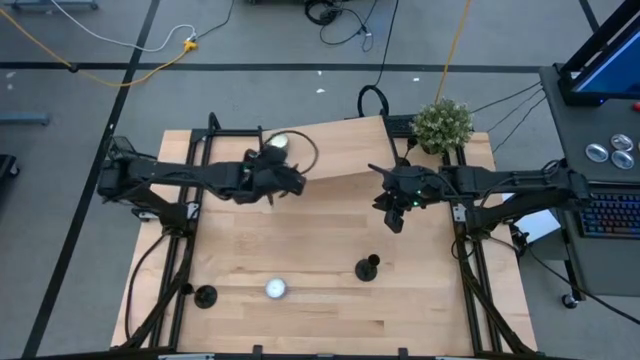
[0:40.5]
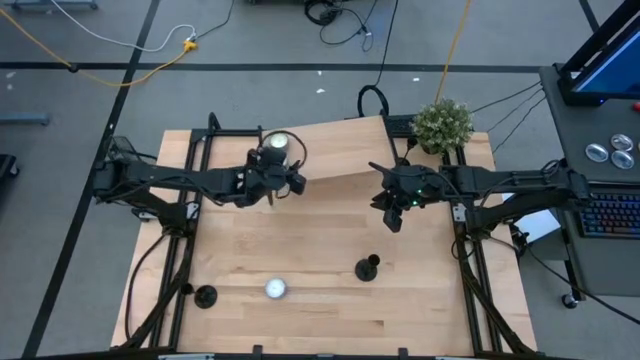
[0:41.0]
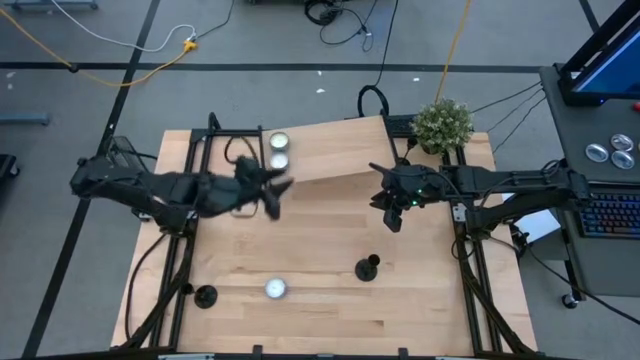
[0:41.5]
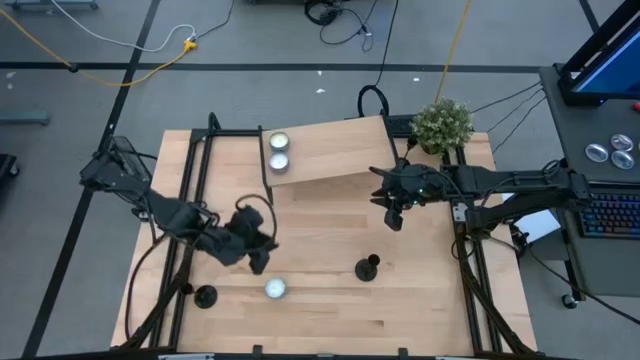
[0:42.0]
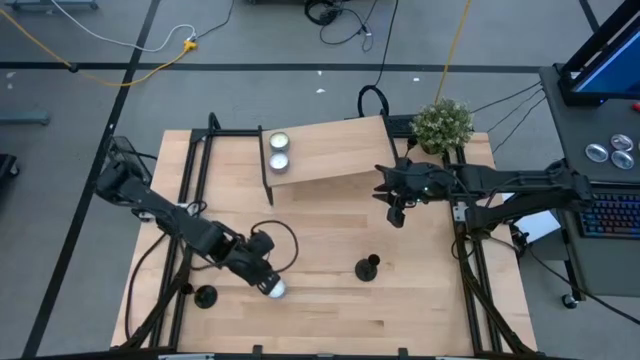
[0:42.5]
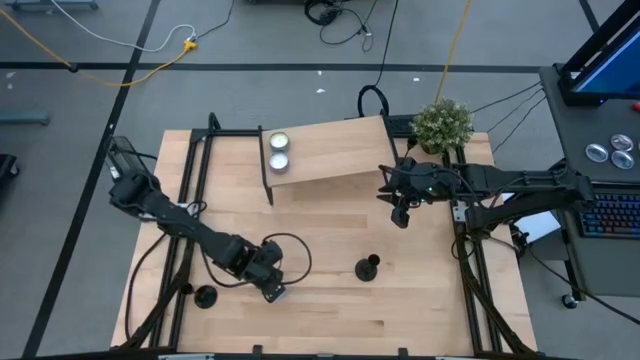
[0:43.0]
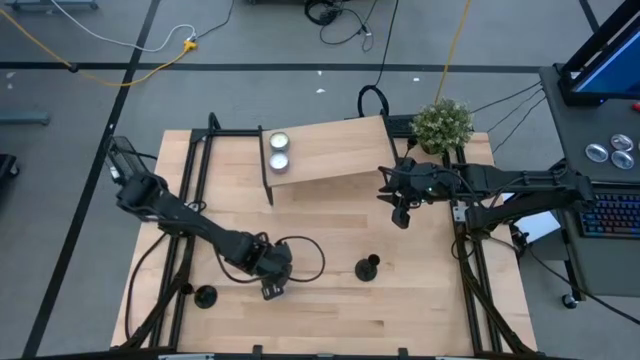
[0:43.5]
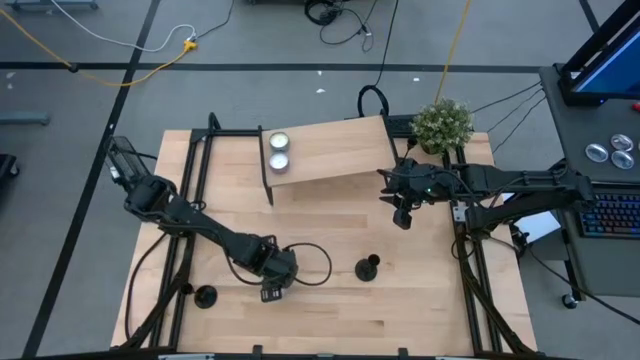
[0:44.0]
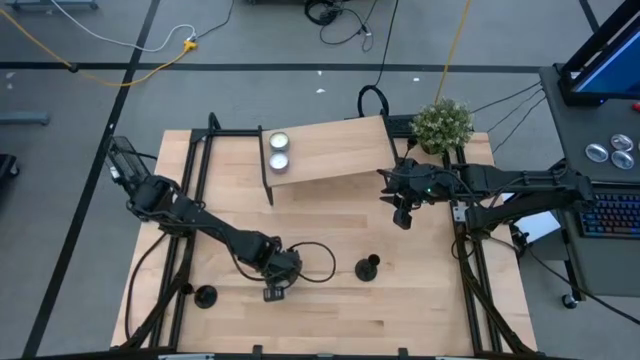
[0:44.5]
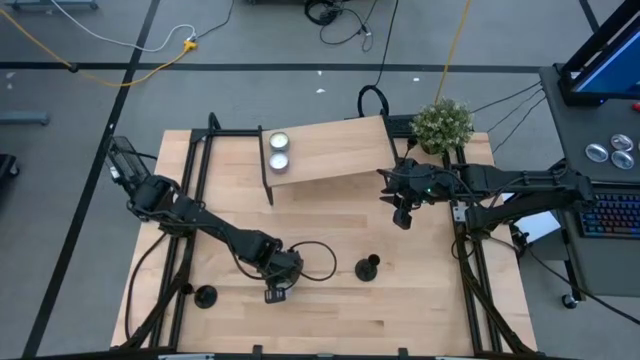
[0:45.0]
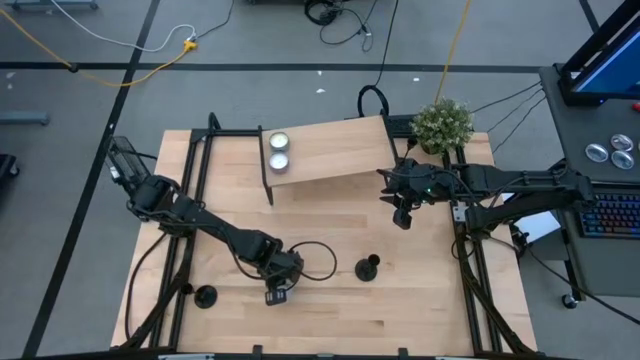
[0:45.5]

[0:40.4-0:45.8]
Task: Pick & Place candle stick holders
Put the red patterned candle on the shelf

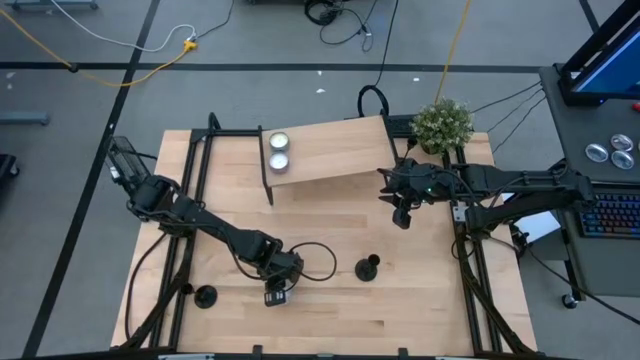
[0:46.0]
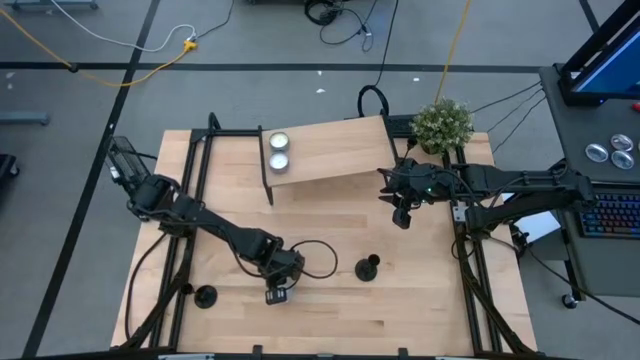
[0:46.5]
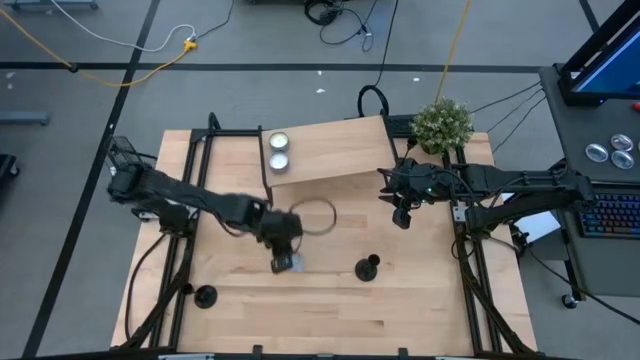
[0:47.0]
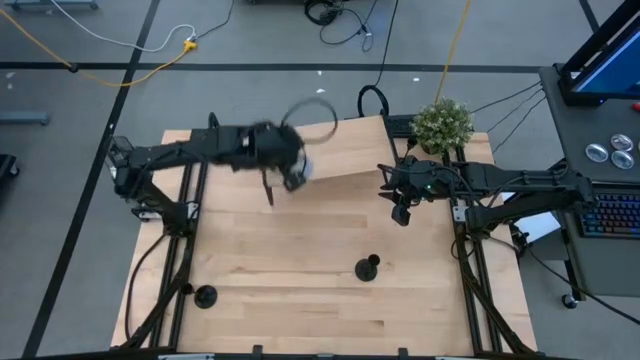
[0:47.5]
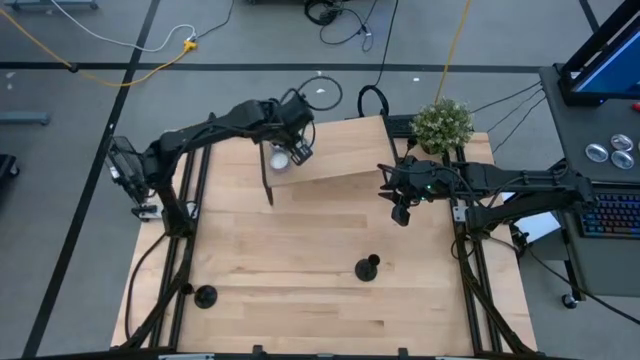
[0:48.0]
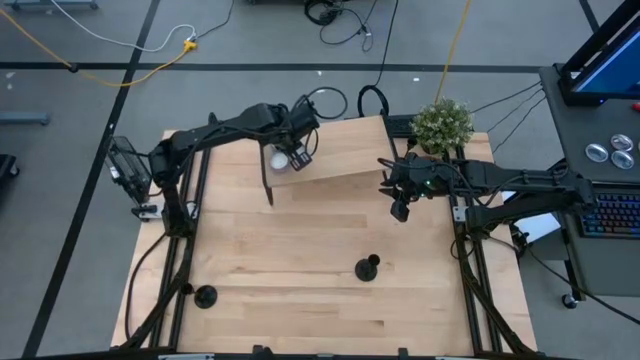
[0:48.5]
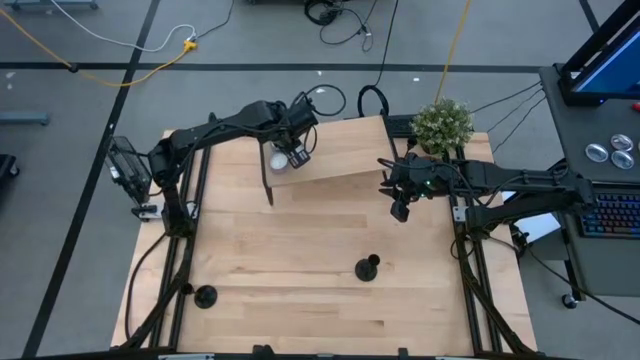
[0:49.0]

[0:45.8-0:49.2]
Put the red patterned candle on the shelf

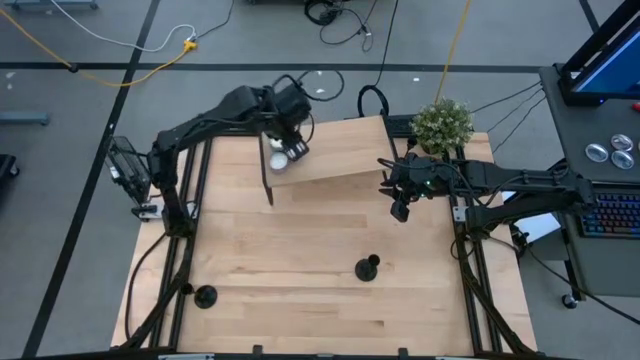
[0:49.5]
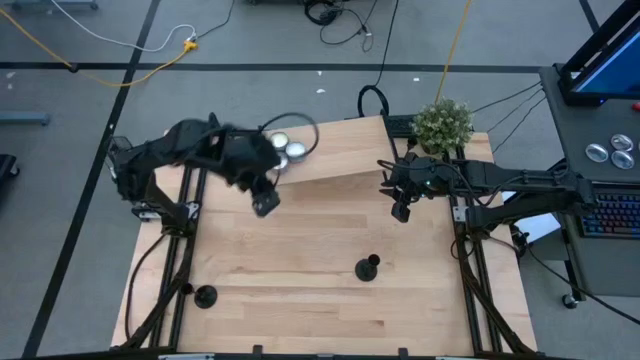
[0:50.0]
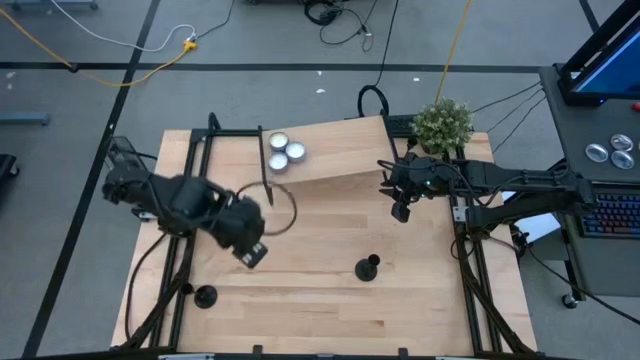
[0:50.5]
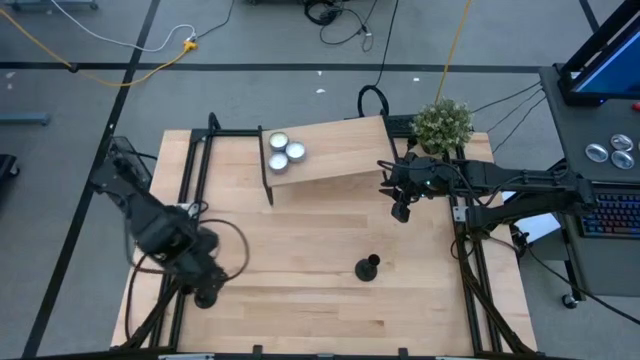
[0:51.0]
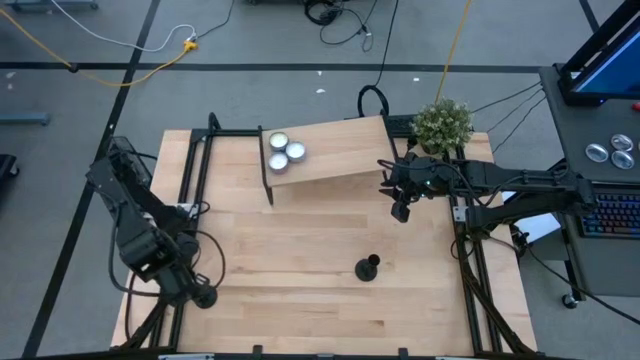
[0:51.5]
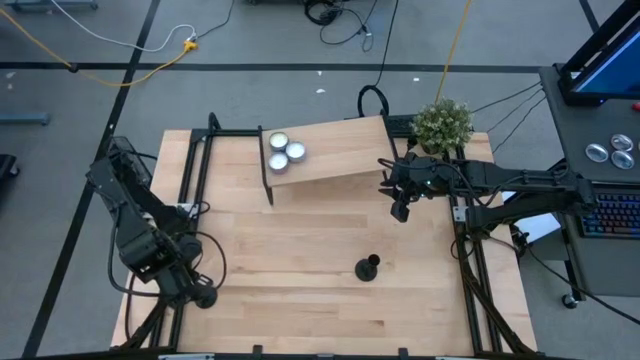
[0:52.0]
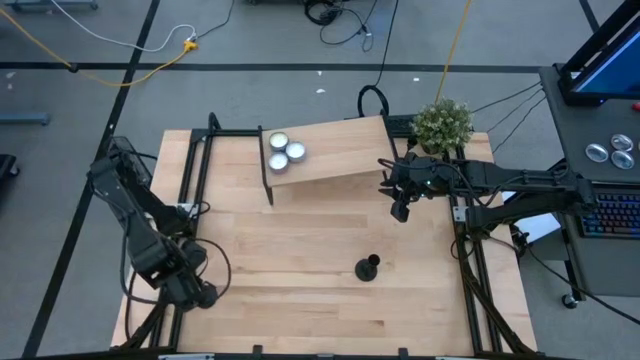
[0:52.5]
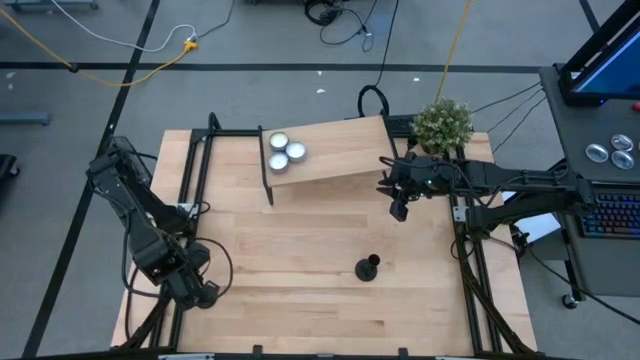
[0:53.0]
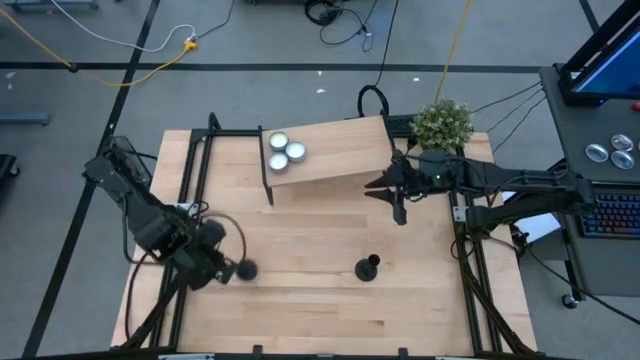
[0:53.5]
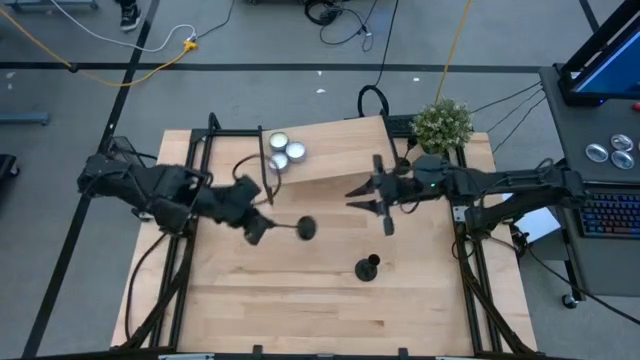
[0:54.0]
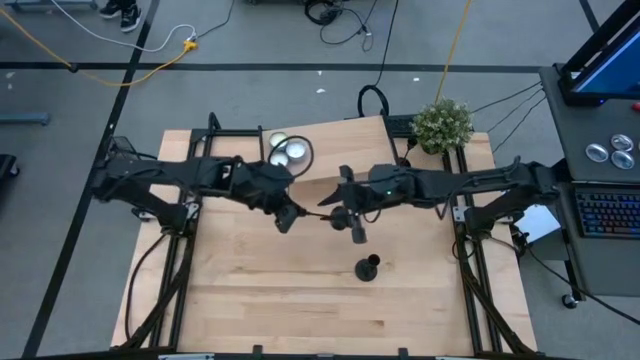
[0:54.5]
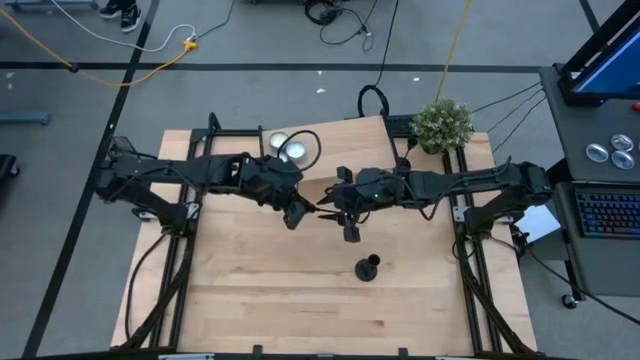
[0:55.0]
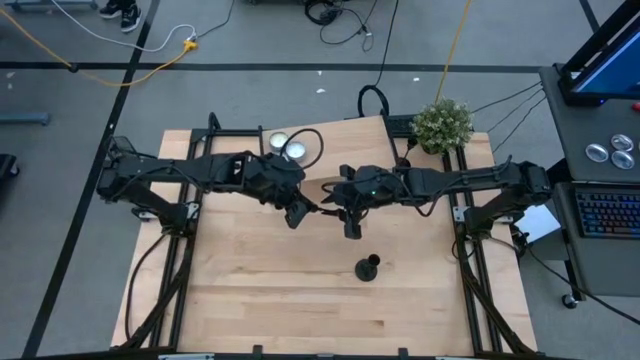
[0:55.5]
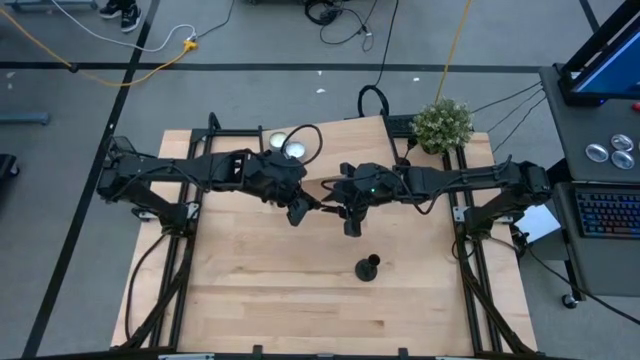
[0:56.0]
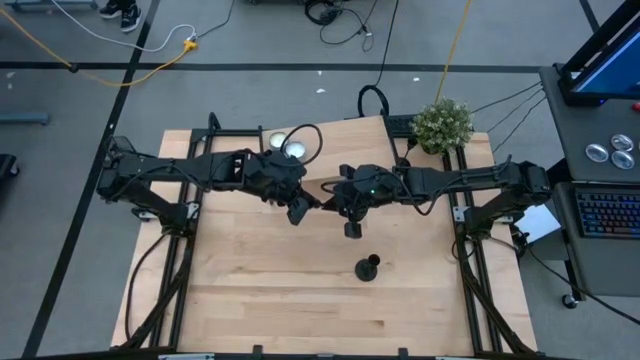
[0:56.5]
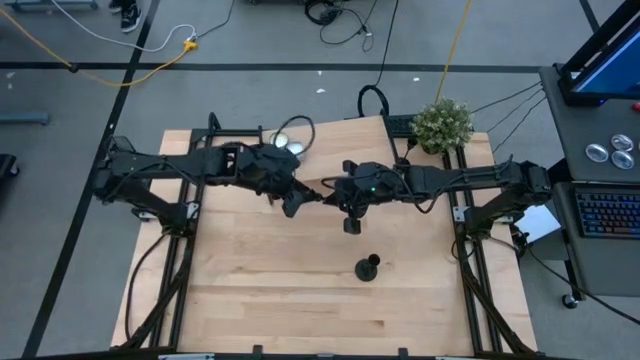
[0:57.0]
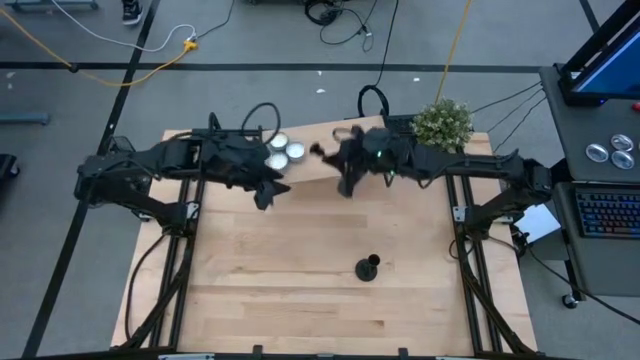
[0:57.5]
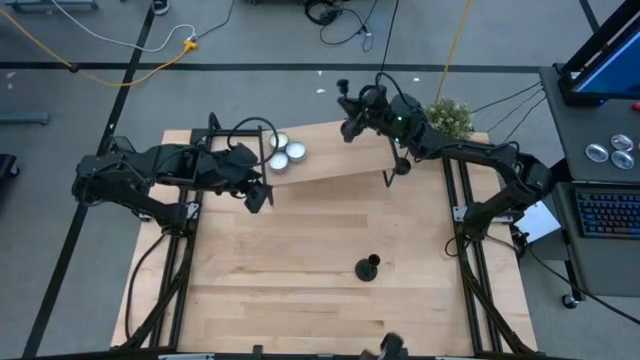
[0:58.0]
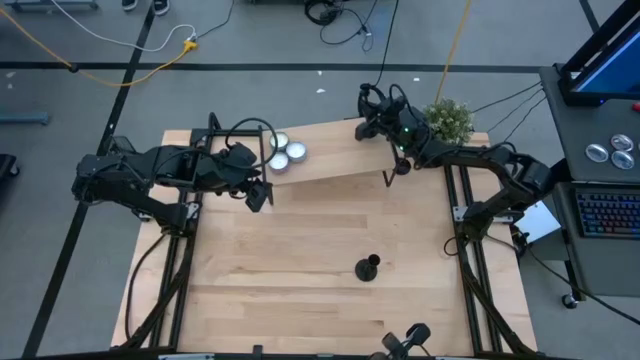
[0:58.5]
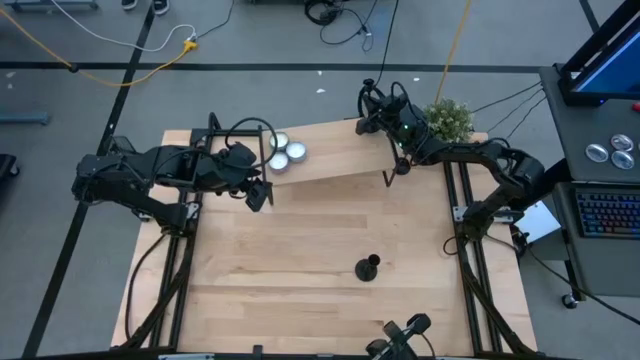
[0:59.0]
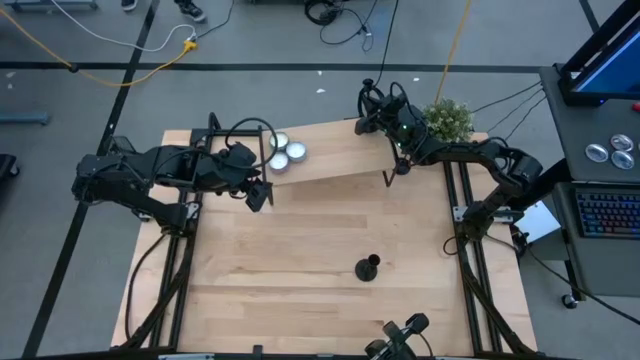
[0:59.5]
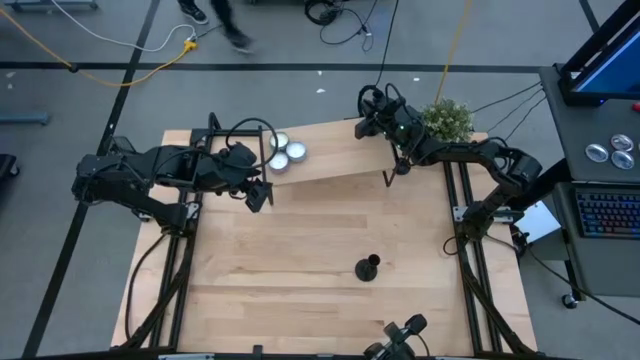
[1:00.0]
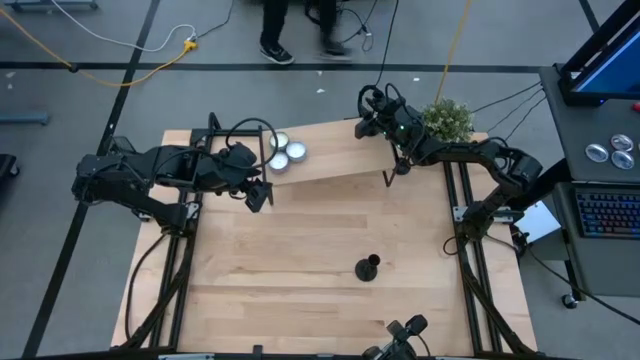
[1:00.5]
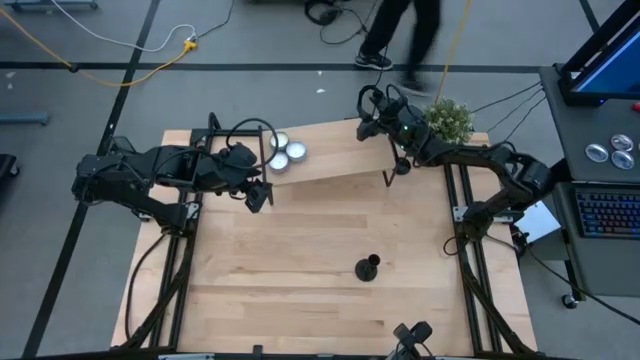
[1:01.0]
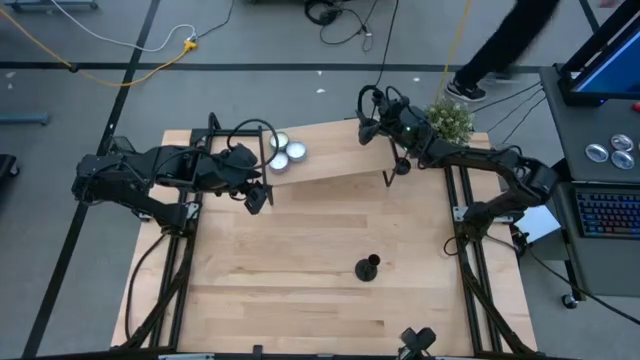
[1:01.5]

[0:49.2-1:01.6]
Put the bottom left black candle holder on the shelf
